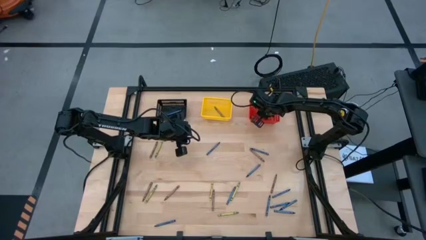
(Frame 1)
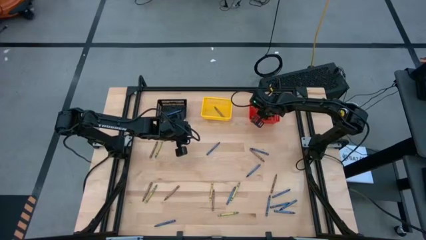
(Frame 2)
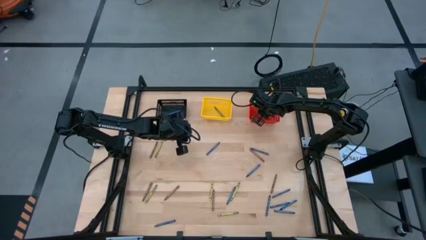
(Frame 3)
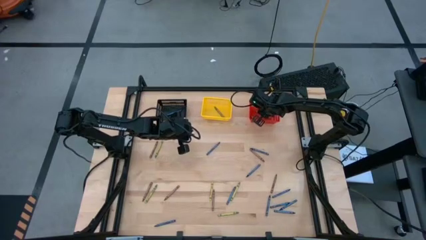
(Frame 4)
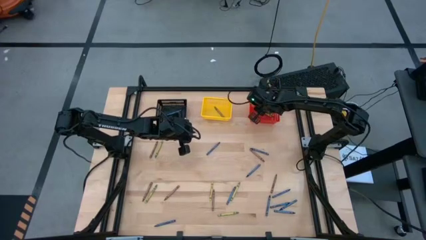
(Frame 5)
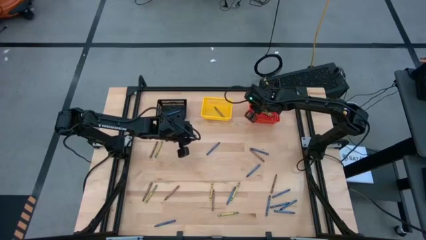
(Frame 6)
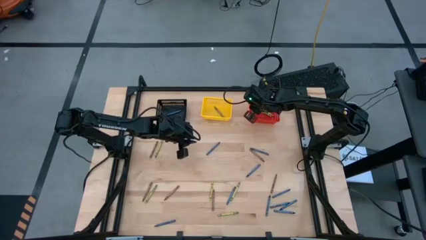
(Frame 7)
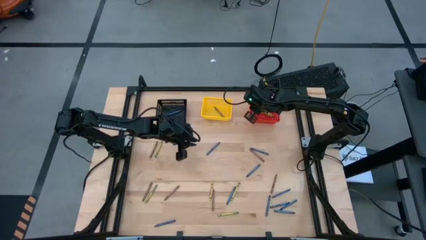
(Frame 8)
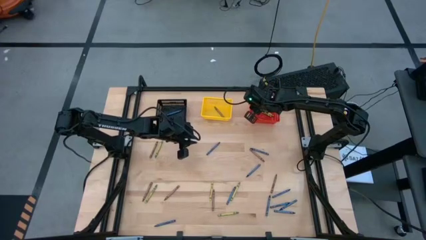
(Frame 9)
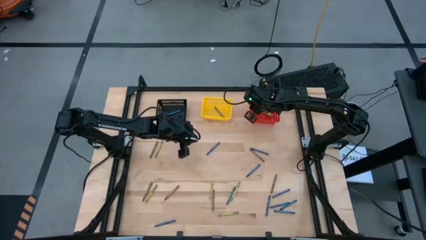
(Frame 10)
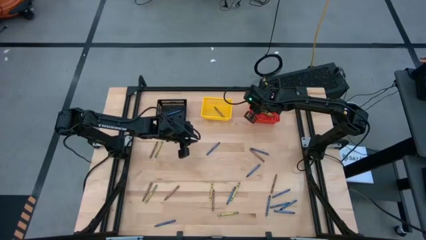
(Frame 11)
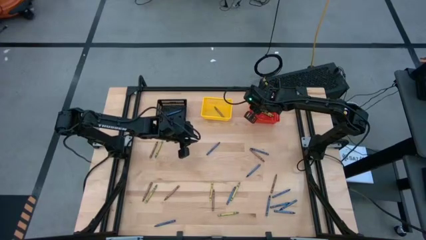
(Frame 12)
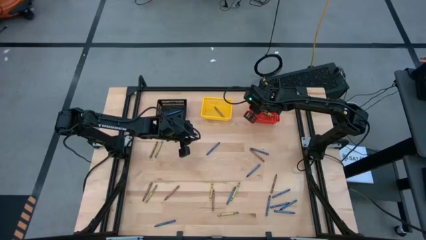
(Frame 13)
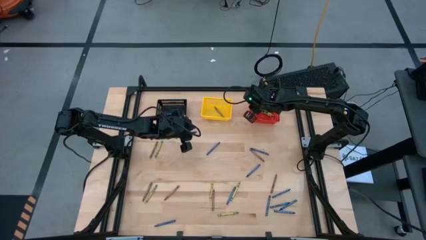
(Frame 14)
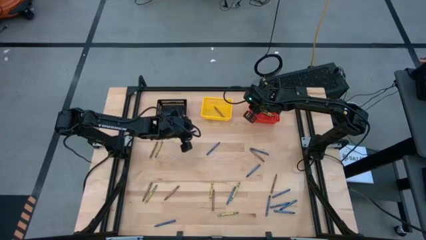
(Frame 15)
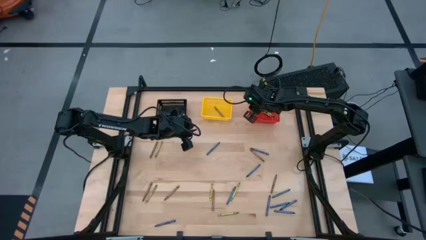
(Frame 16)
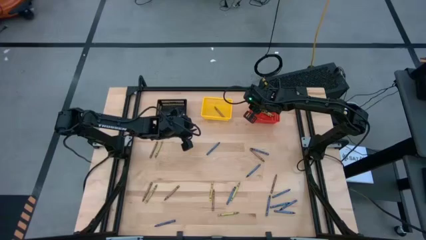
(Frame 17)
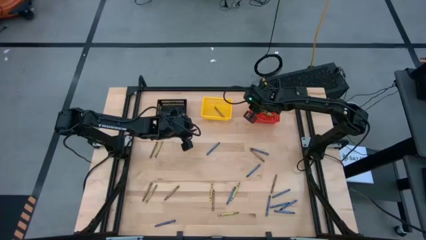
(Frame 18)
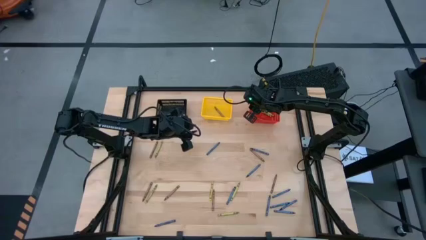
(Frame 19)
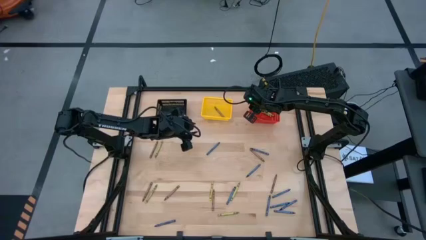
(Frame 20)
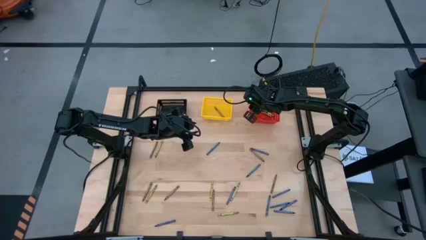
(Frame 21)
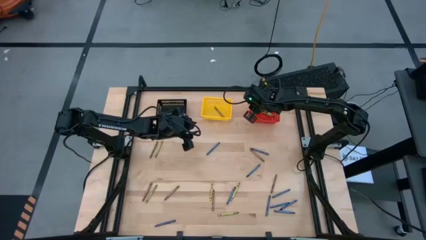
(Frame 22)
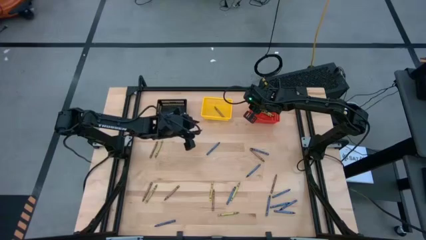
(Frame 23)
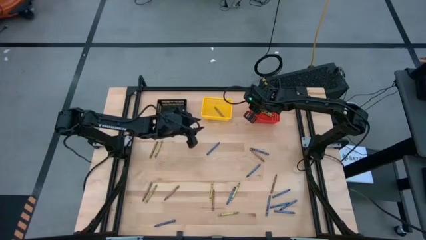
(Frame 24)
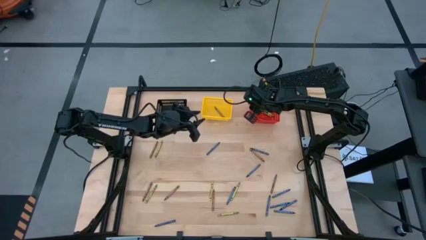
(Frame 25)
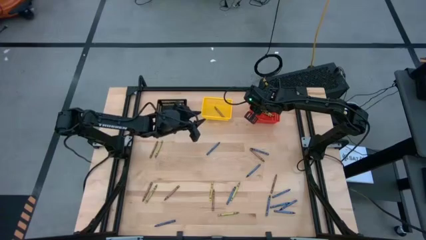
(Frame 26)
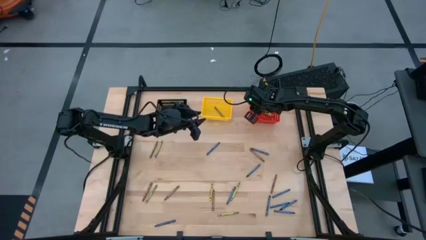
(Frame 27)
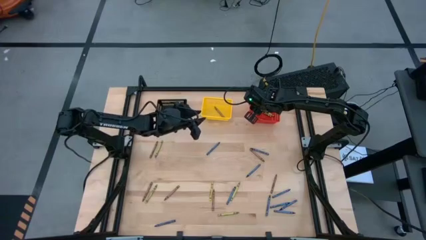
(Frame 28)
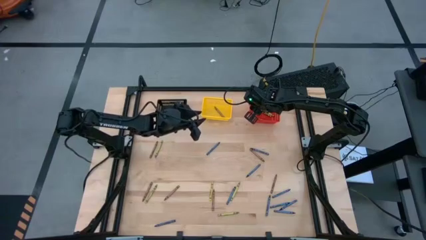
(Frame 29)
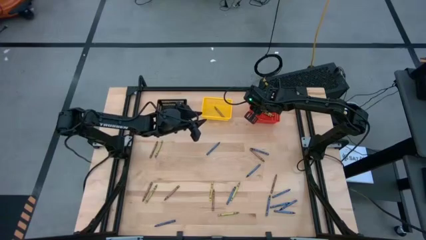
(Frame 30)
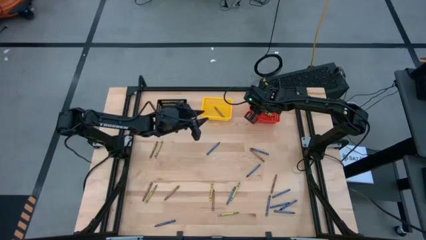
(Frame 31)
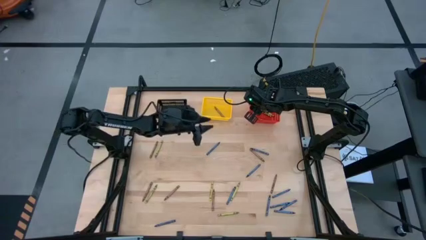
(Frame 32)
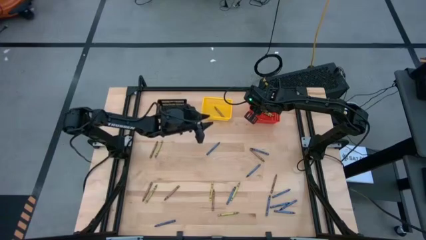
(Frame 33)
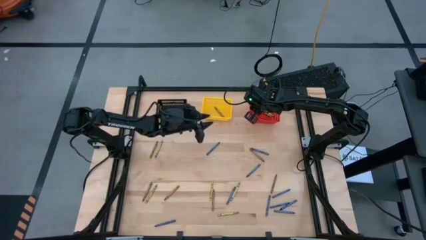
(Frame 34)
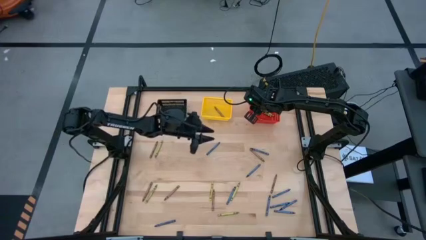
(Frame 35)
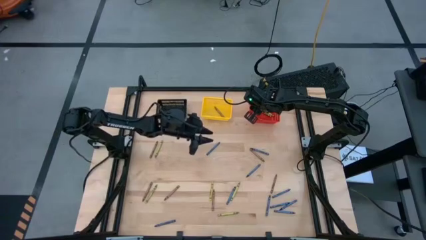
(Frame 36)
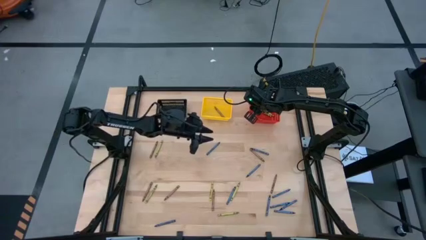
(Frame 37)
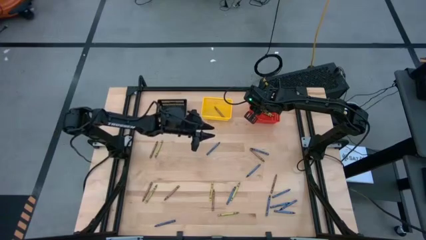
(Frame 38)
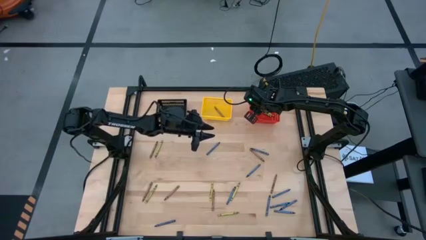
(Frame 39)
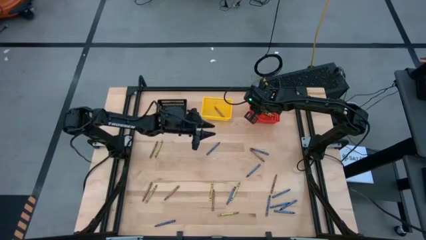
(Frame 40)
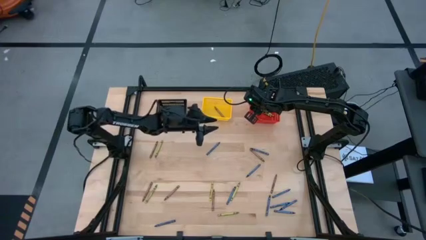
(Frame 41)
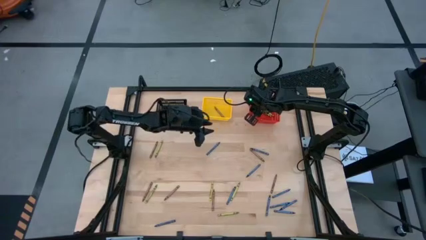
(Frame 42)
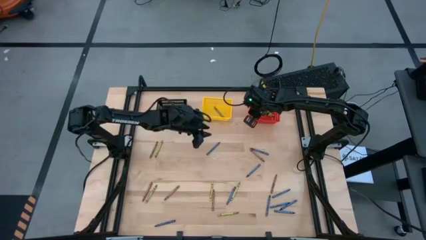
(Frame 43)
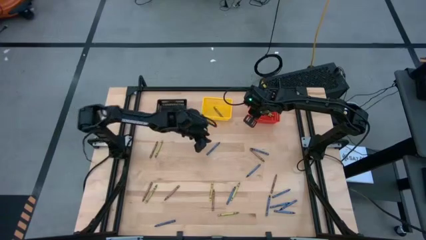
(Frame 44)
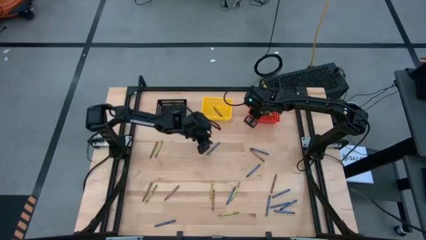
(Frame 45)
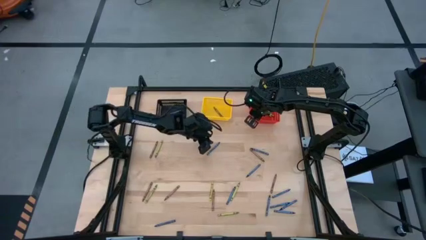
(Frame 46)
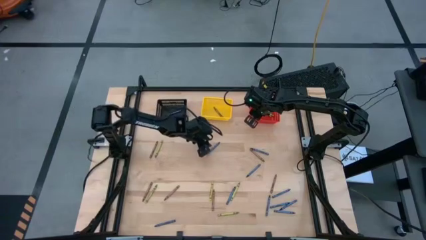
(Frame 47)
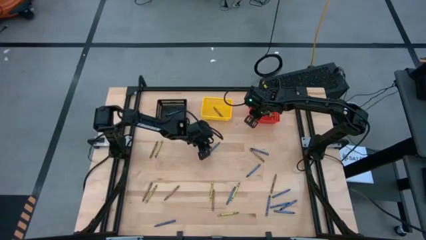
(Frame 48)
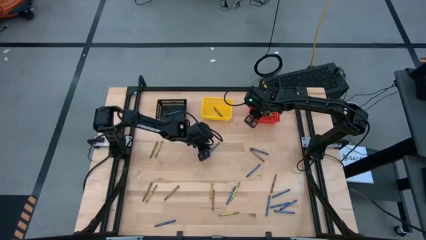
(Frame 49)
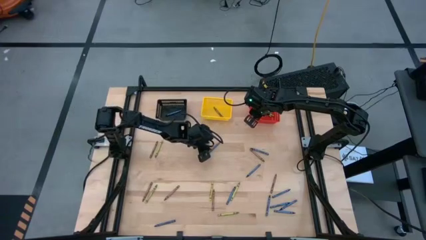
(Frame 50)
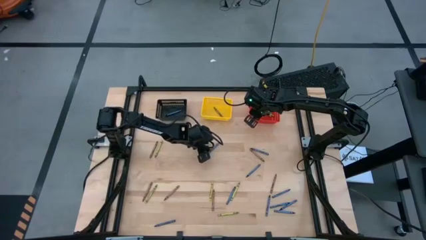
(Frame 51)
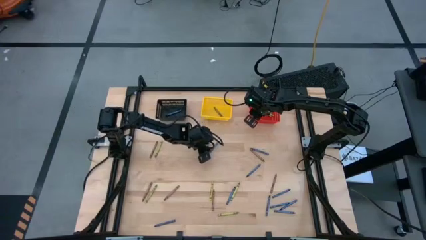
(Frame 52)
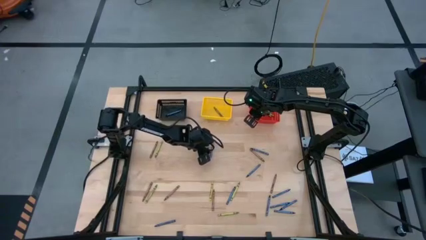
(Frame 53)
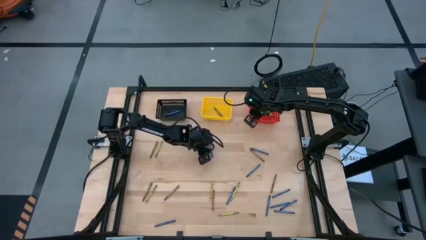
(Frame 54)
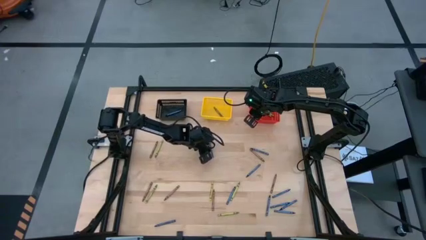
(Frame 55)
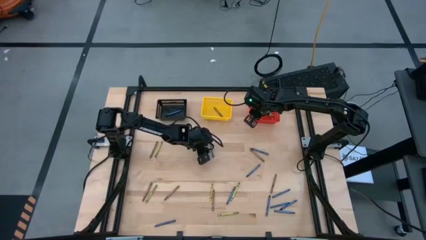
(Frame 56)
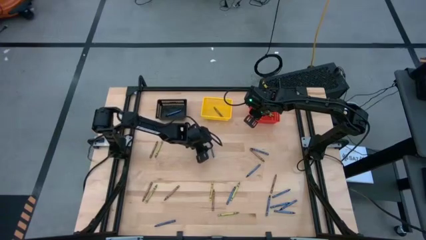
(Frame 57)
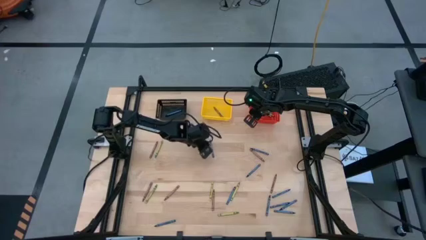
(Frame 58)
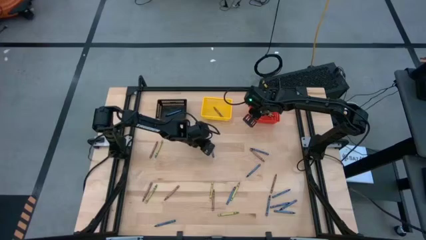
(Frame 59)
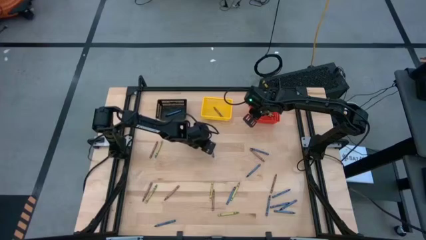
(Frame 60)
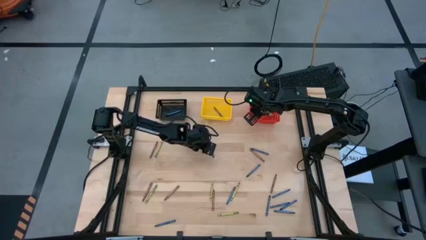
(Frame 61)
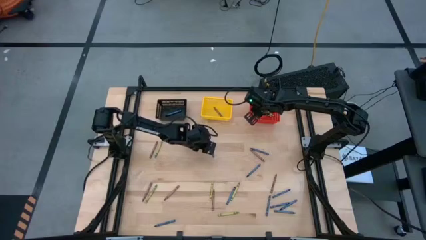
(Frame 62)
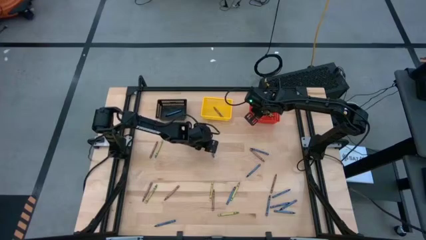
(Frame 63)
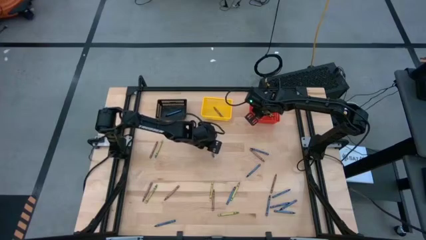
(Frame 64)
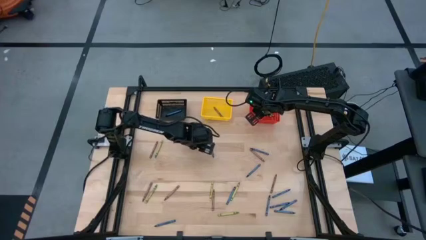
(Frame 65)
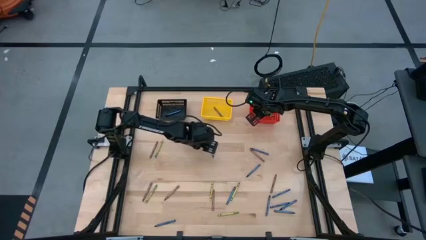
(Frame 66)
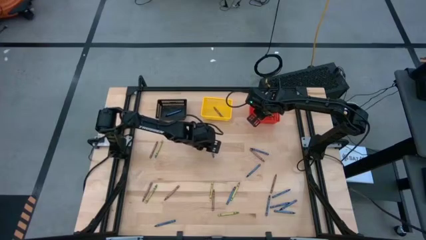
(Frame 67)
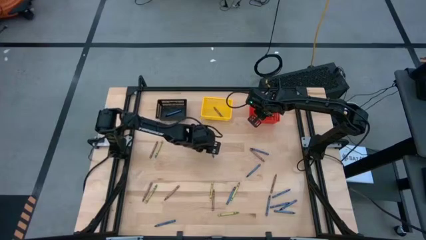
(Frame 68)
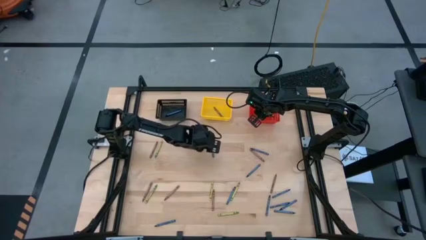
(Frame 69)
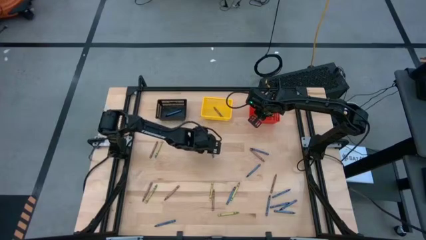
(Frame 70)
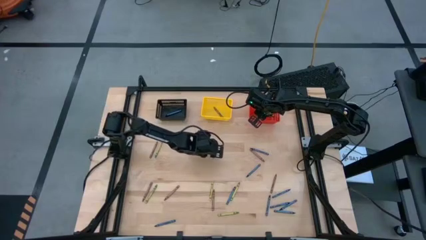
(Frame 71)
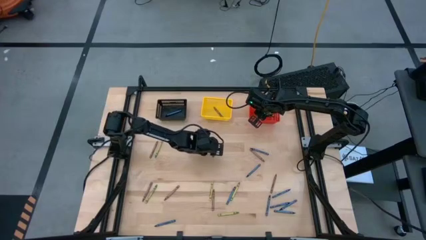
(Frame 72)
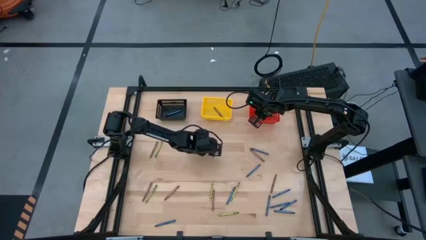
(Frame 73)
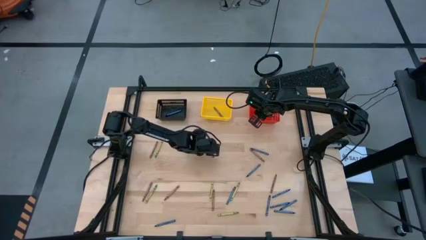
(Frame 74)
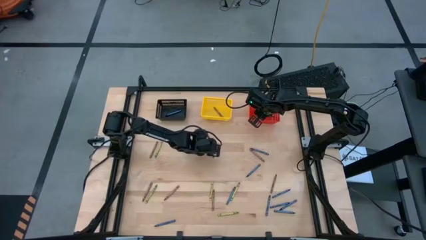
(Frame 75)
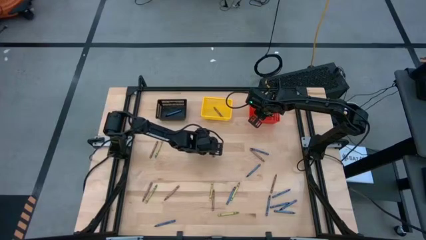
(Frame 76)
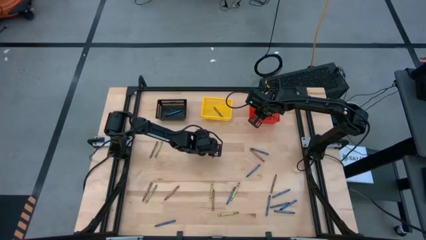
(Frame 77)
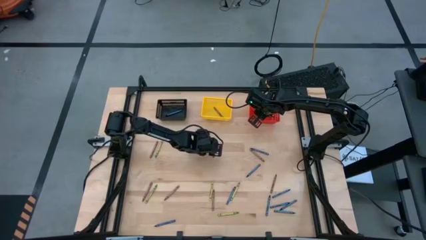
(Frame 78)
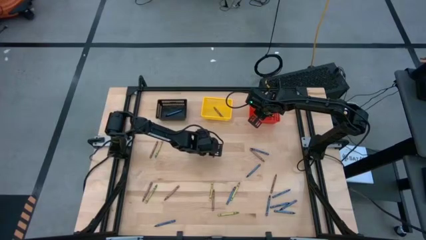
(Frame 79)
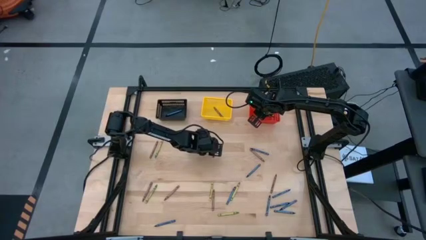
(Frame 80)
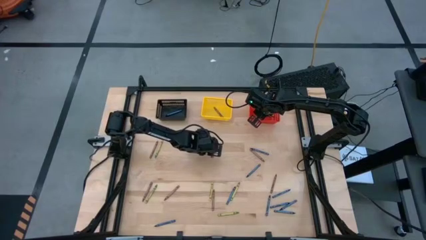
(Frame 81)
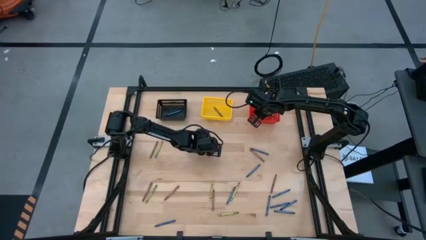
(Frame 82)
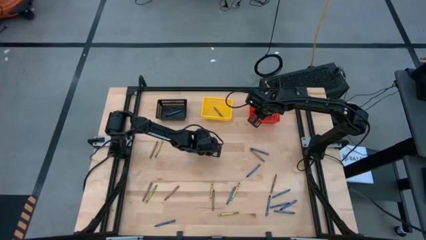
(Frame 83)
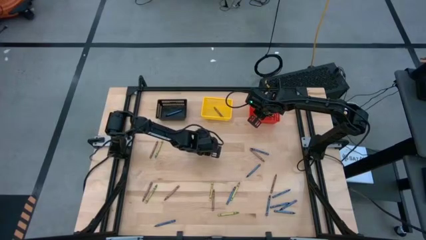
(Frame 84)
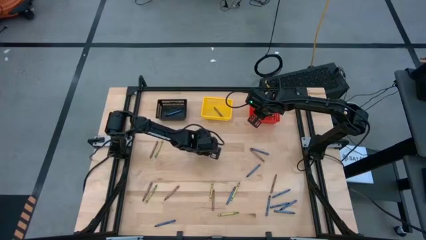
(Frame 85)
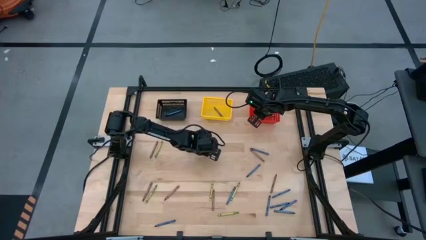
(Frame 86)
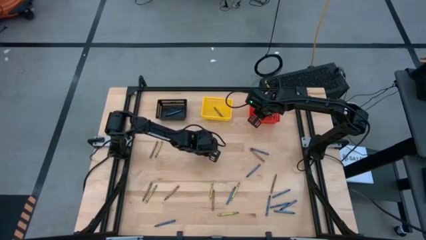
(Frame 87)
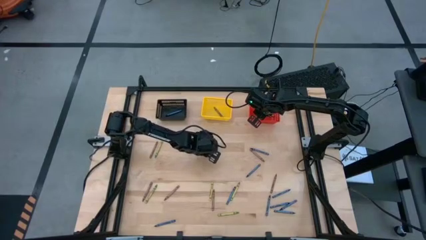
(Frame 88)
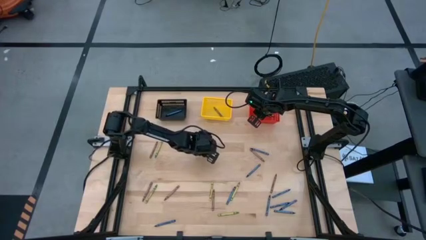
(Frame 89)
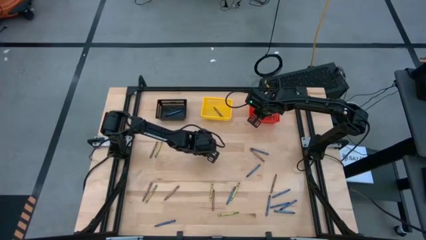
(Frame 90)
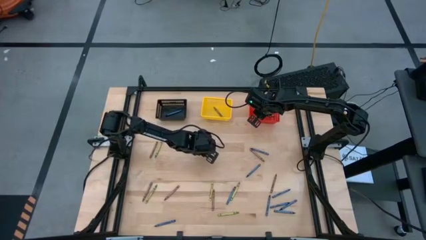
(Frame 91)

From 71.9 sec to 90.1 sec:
Task: Sort crayons
Put the blue crayon into the black bin
